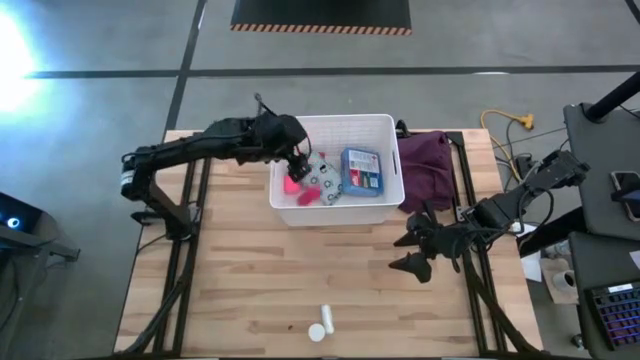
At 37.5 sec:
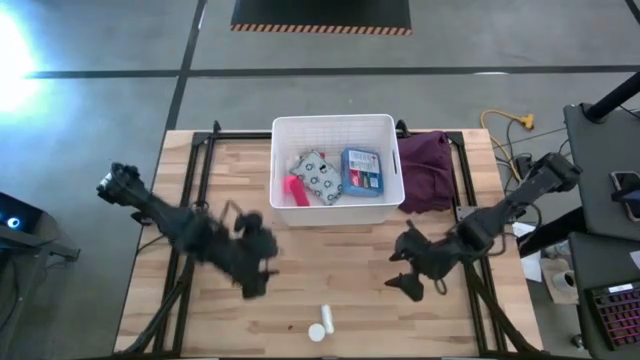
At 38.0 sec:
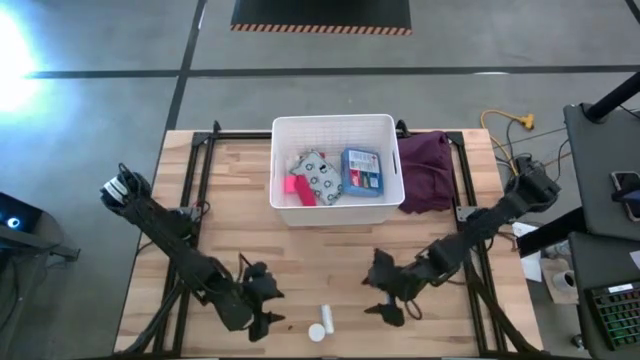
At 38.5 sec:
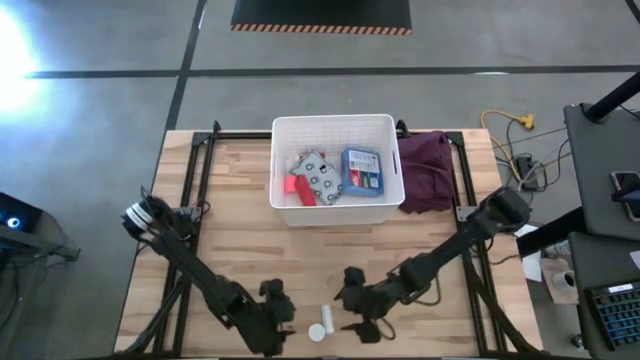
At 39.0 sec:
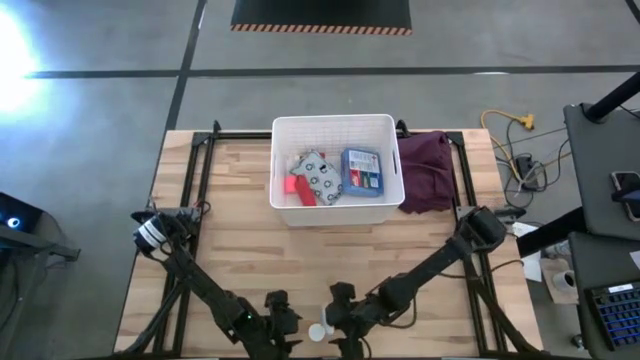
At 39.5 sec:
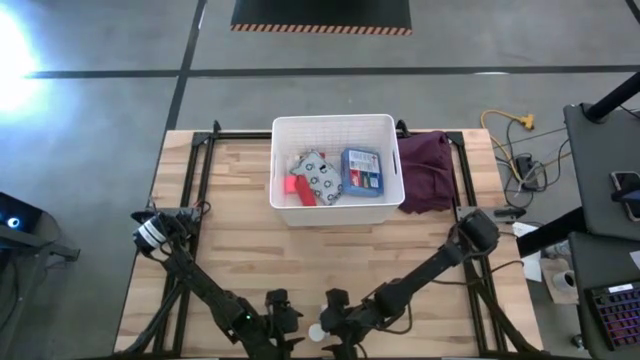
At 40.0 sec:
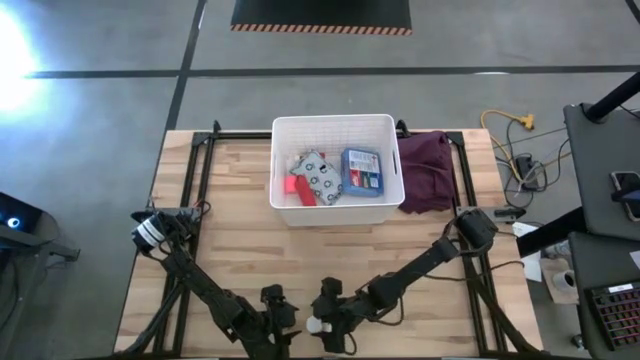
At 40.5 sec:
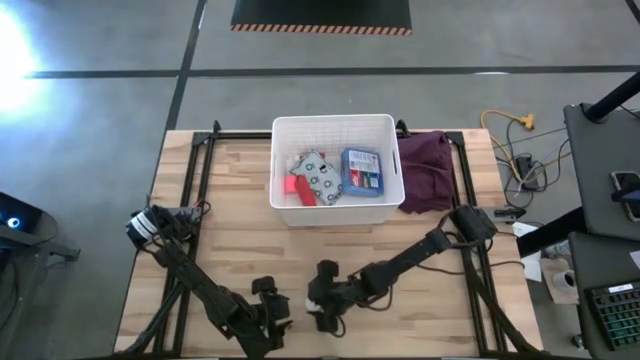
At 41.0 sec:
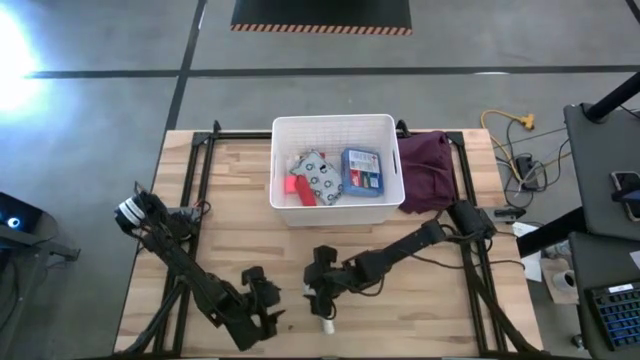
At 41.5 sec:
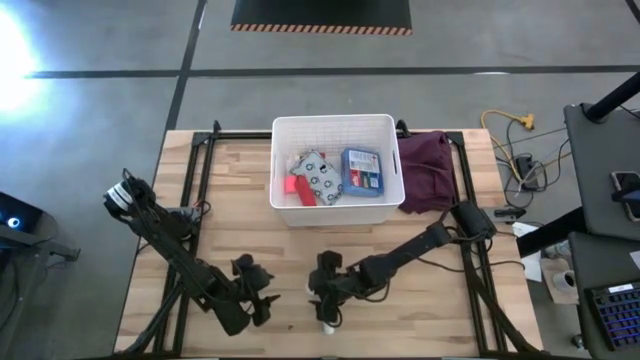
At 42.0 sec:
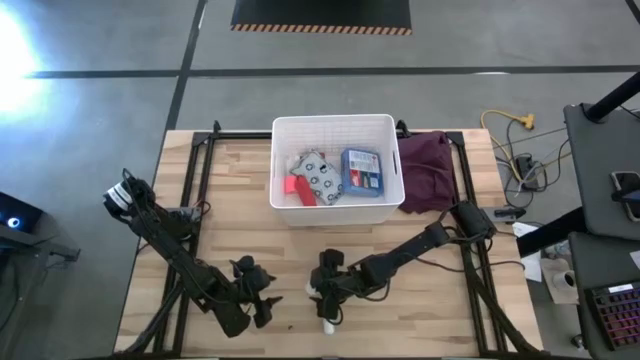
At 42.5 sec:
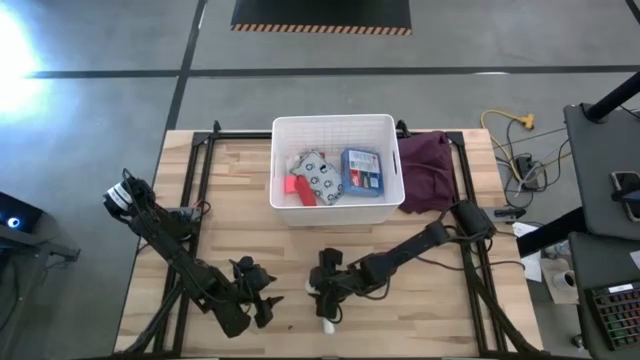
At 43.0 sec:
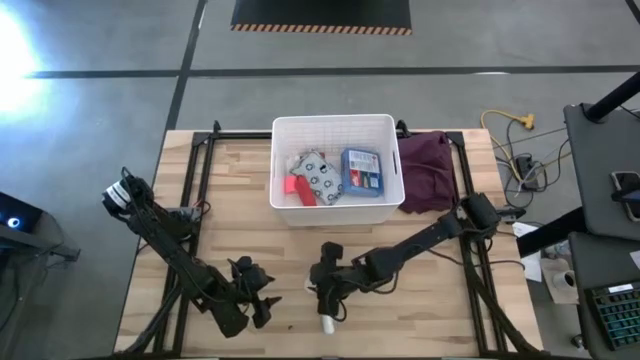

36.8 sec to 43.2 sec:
Task: Pick & place medical supplies in basket/bin
Put the orange pill bottle into the white bin

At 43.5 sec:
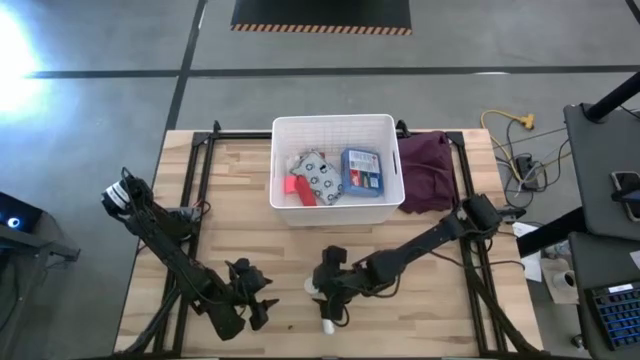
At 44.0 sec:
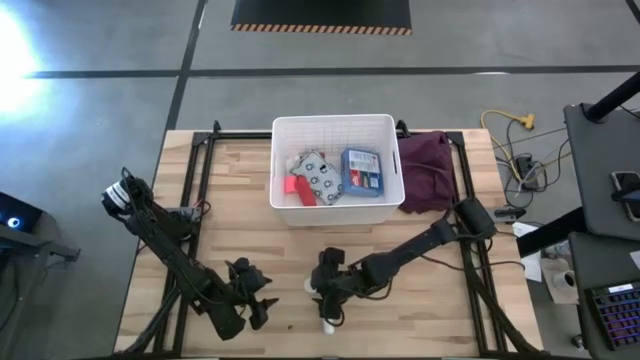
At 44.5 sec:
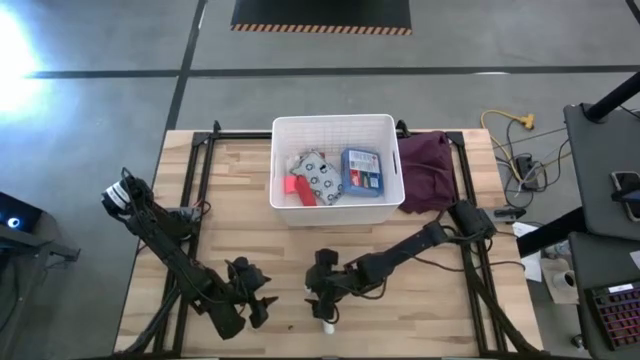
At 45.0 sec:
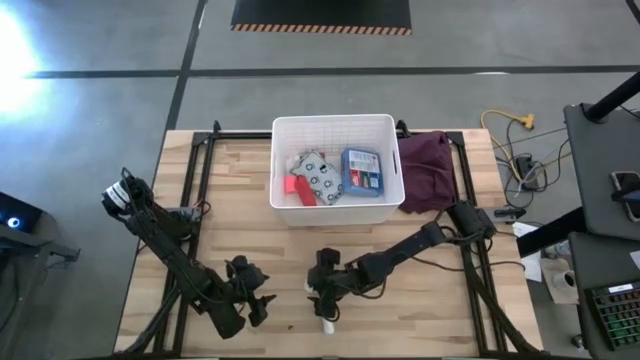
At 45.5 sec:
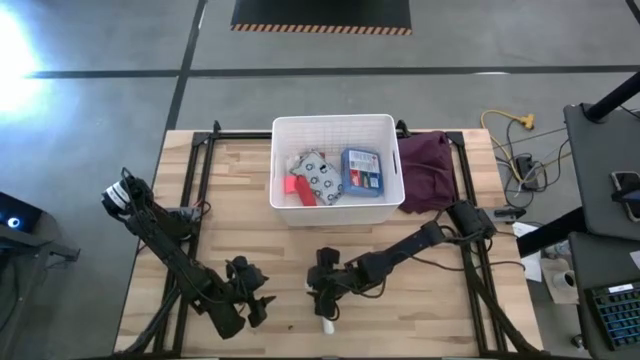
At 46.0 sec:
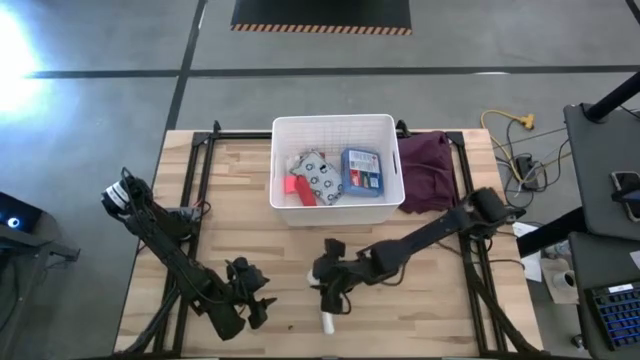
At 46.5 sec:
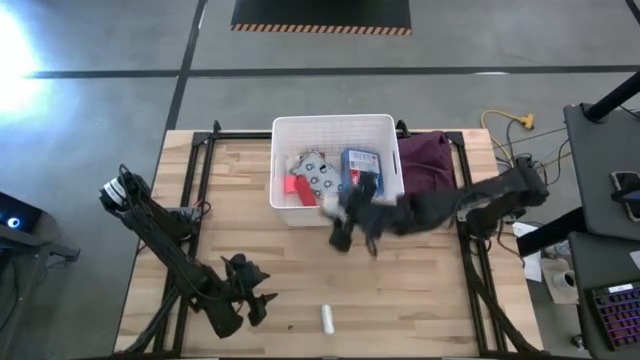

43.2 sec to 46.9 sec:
Put the orange pill bottle into the white bin

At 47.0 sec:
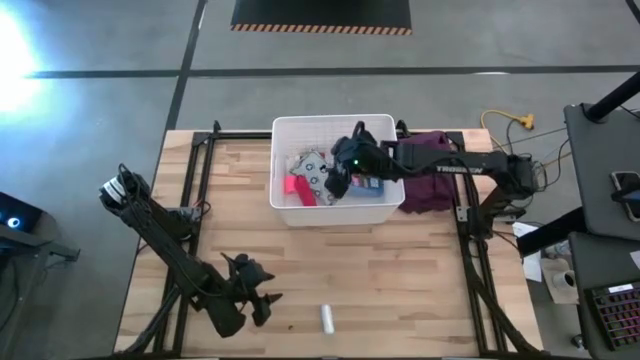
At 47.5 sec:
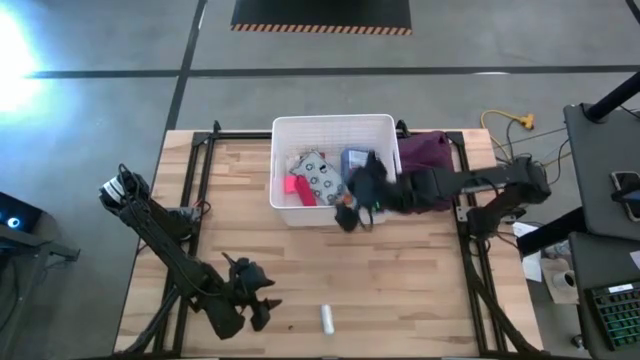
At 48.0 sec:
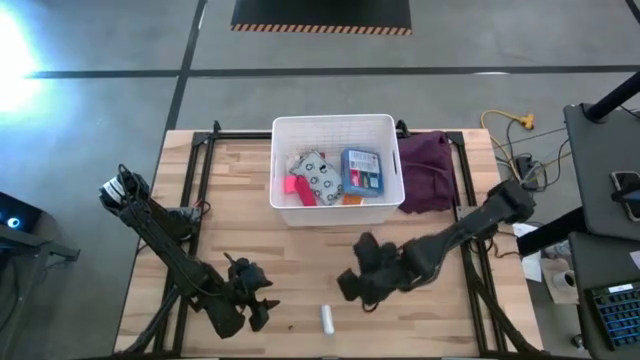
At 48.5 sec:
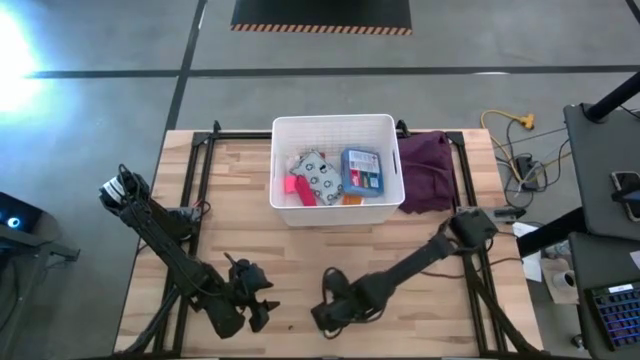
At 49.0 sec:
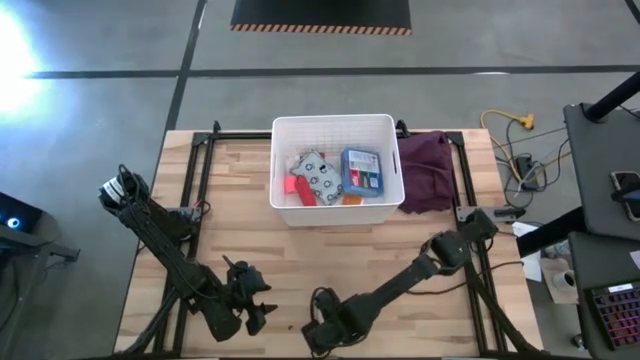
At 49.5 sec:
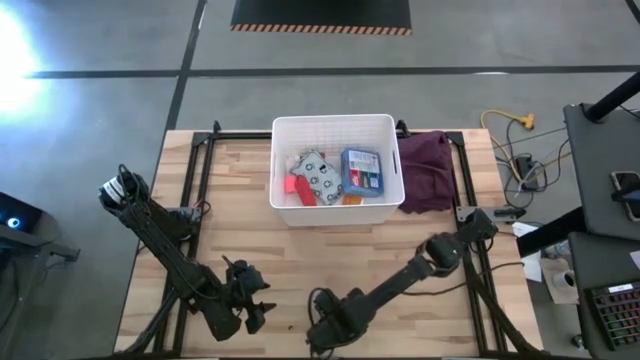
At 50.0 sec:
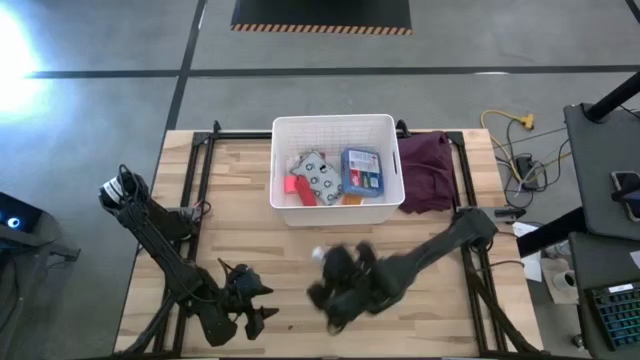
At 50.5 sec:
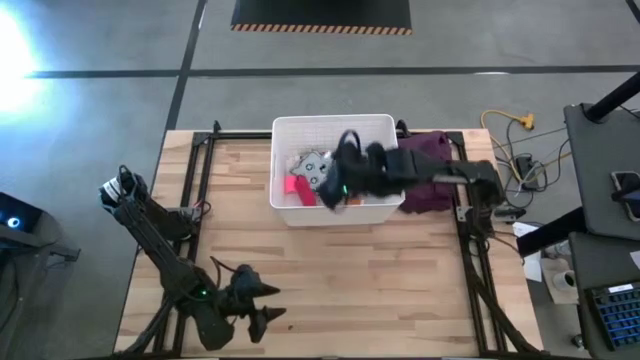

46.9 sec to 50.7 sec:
Put the white rolled gauze into the white bin

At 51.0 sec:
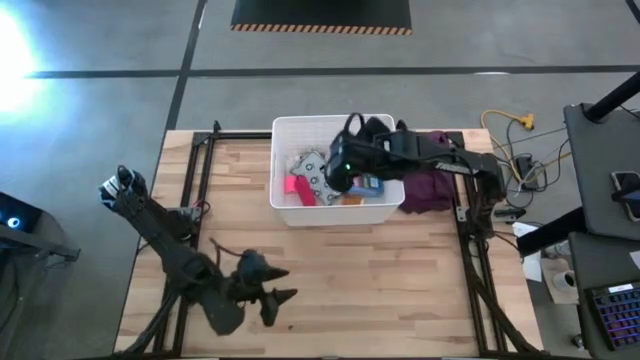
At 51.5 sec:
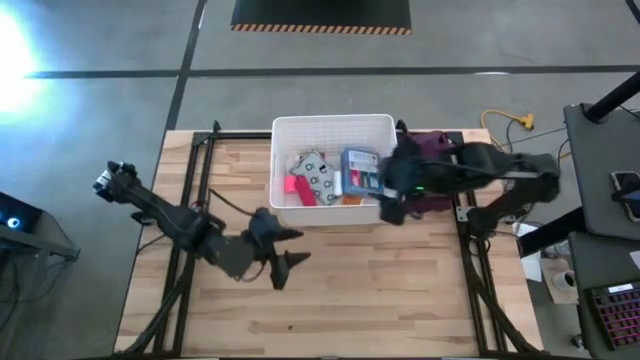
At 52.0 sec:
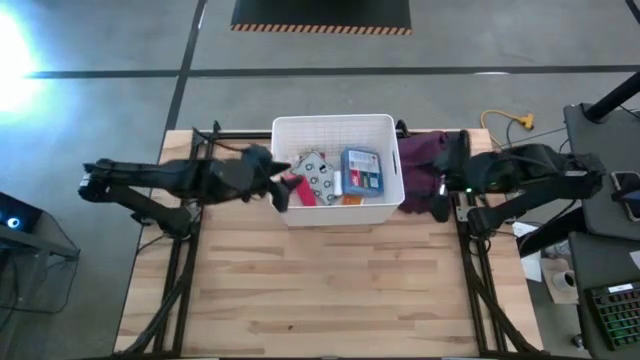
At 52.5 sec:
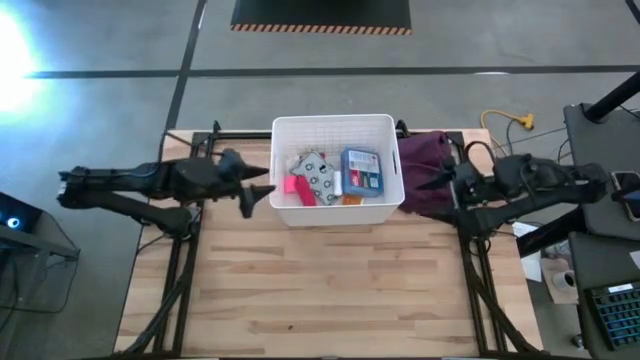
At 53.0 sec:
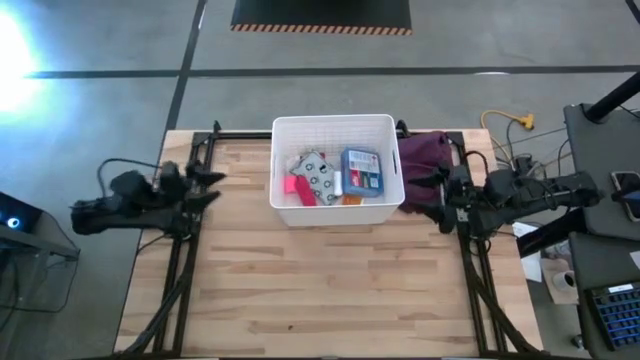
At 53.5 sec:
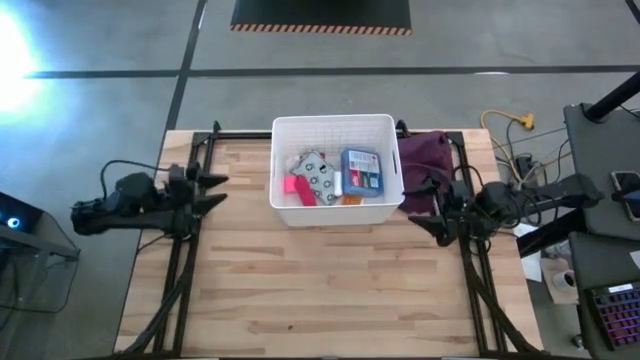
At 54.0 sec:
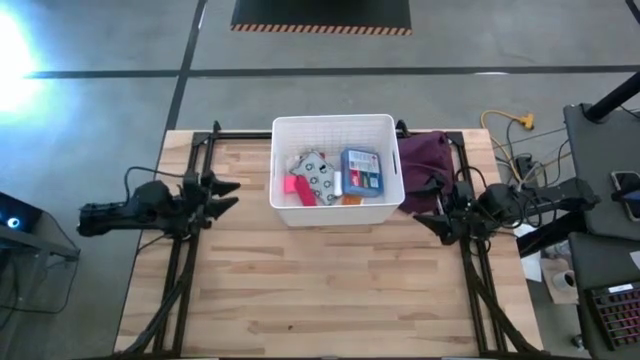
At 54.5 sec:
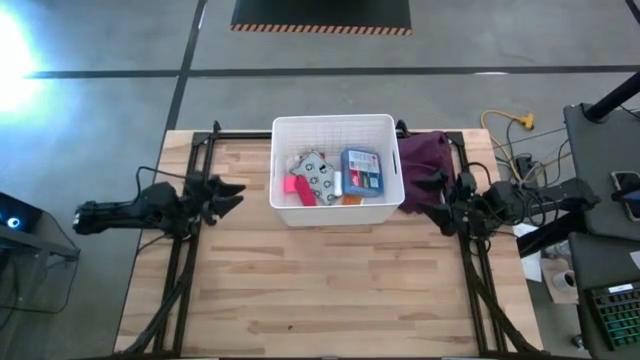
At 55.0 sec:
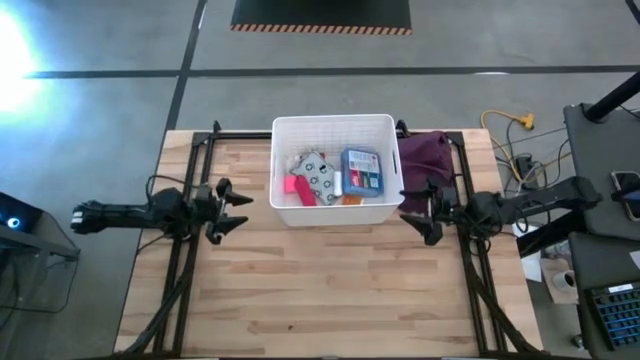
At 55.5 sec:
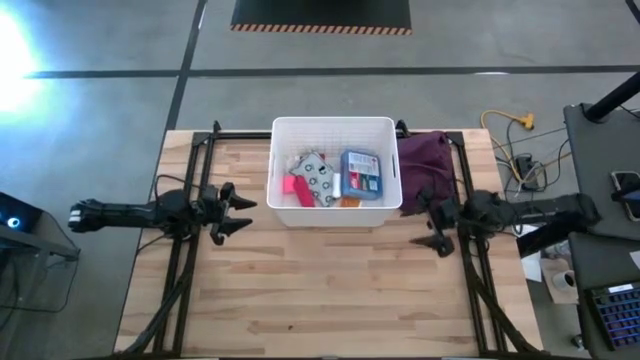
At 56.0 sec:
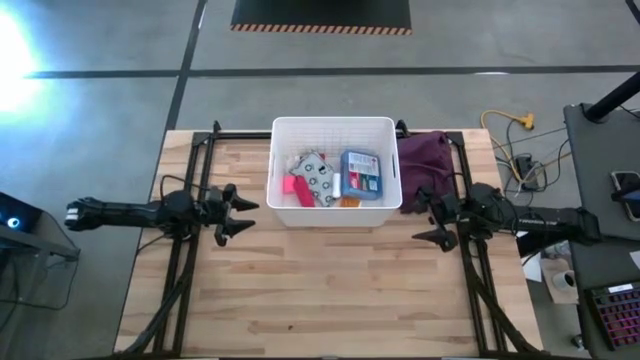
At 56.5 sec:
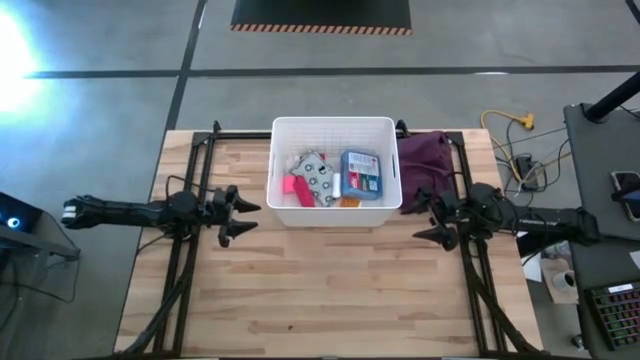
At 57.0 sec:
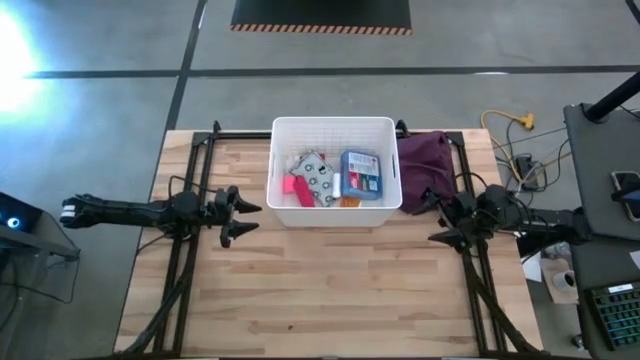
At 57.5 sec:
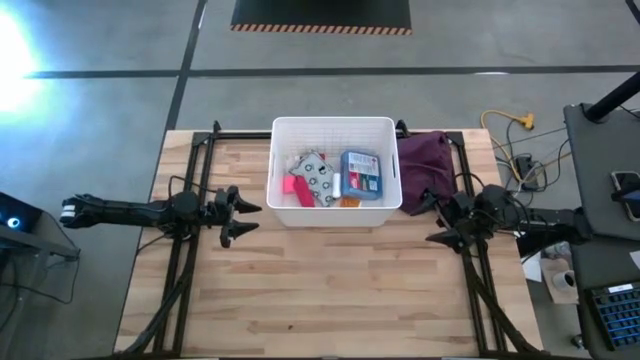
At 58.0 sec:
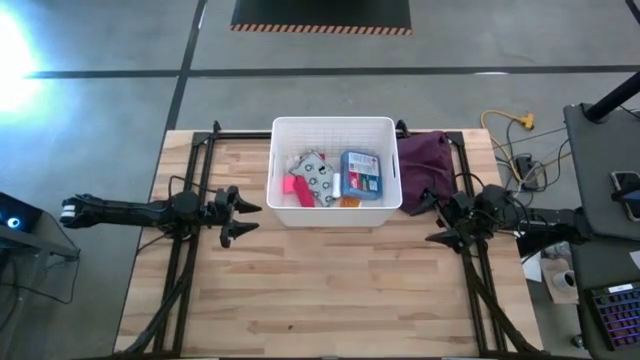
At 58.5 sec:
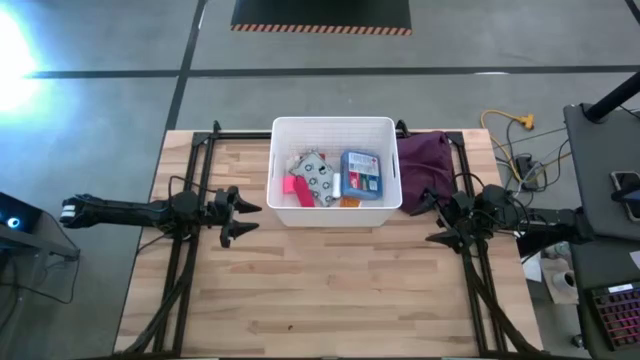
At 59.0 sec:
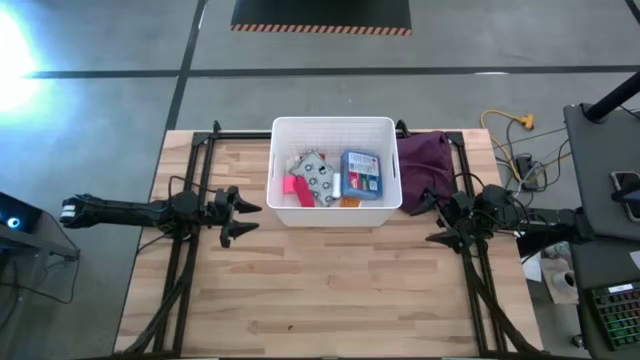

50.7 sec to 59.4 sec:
Return to Home Position
